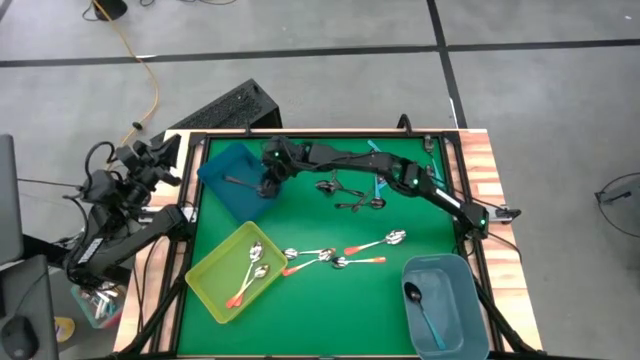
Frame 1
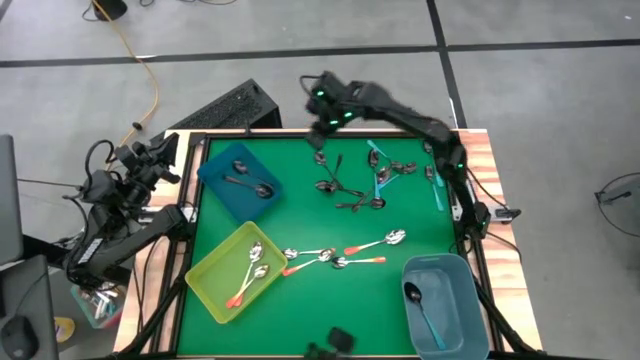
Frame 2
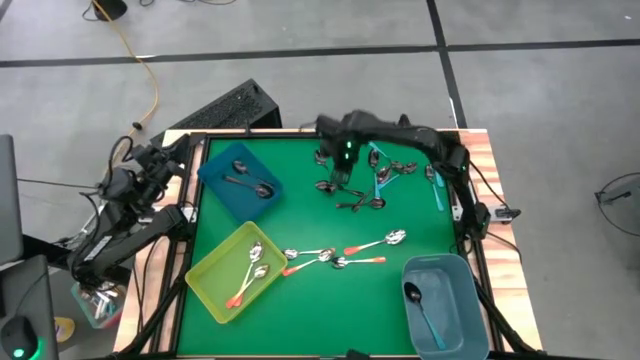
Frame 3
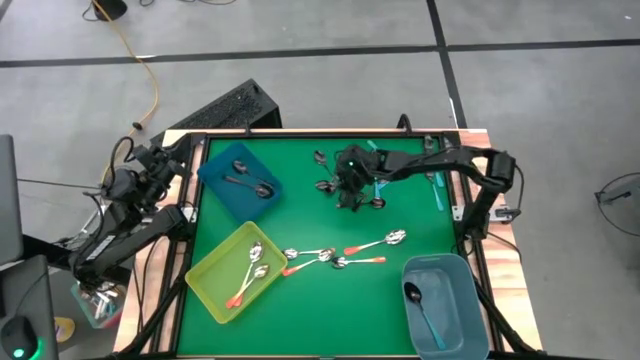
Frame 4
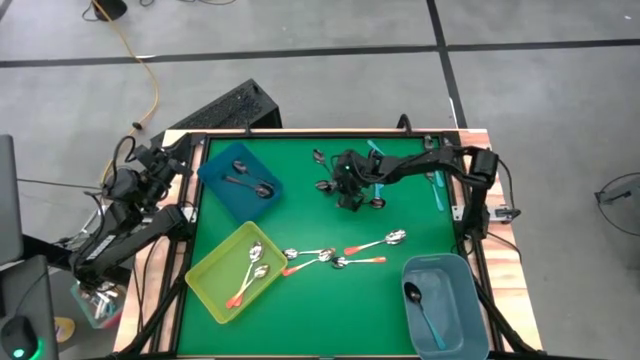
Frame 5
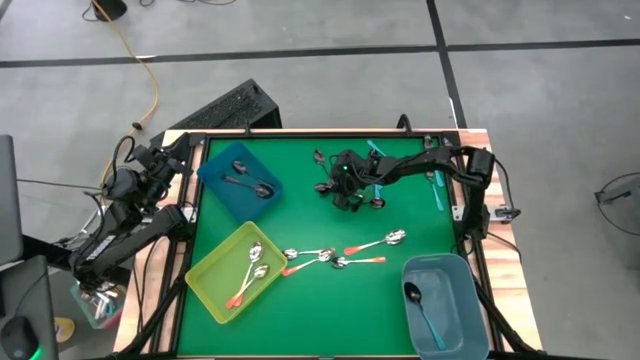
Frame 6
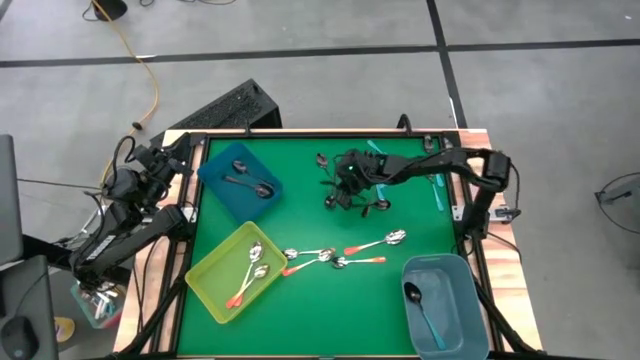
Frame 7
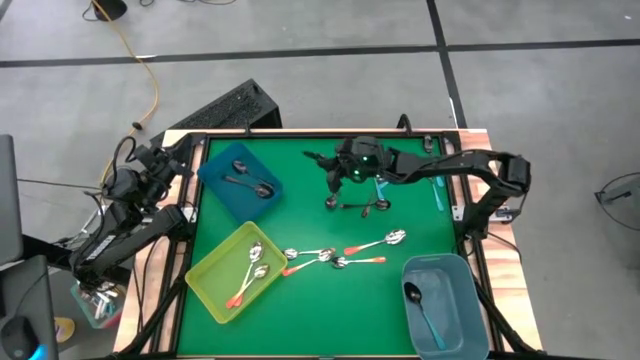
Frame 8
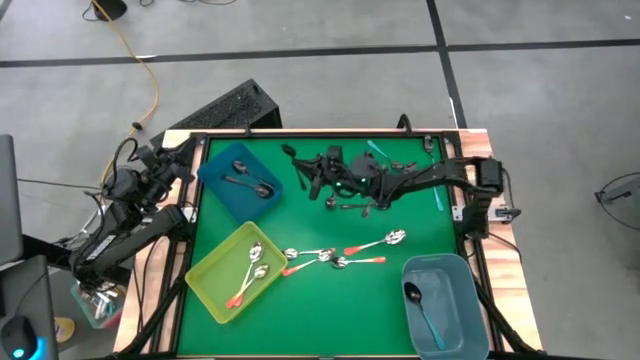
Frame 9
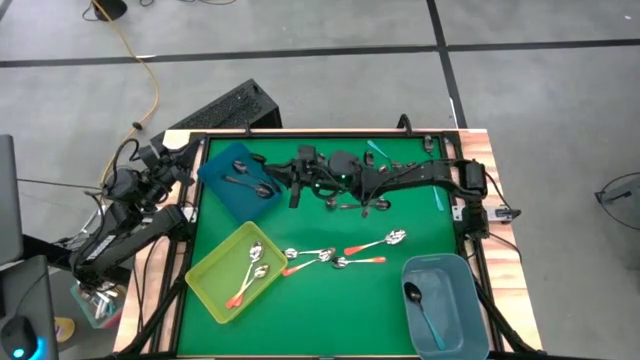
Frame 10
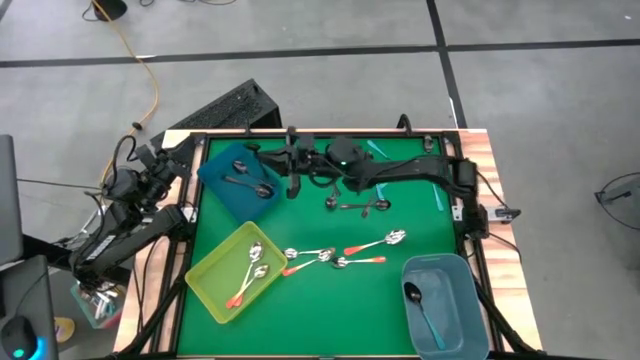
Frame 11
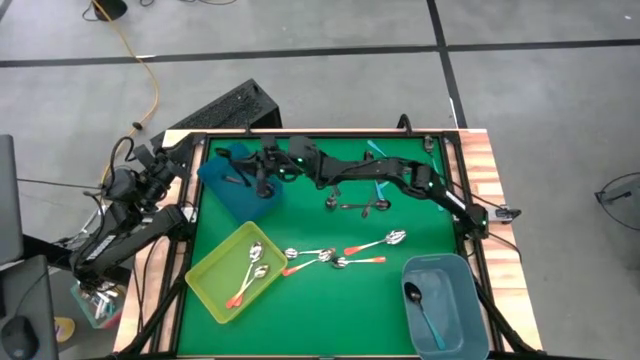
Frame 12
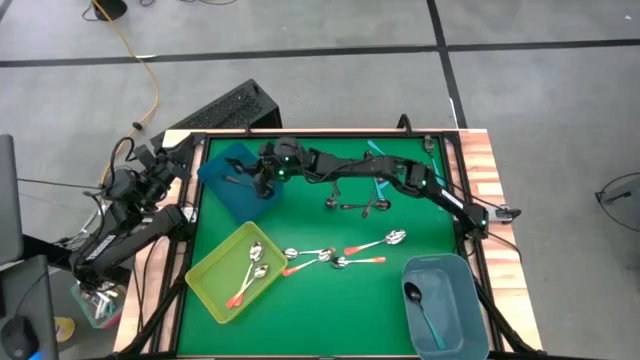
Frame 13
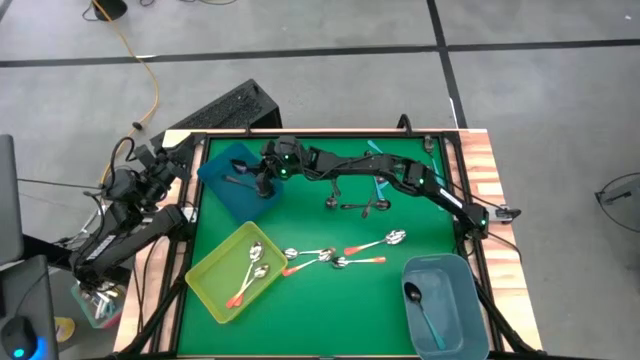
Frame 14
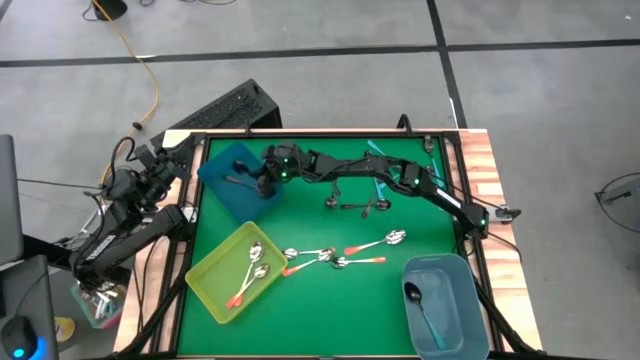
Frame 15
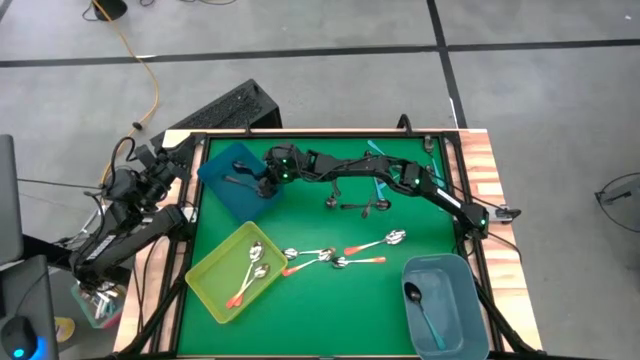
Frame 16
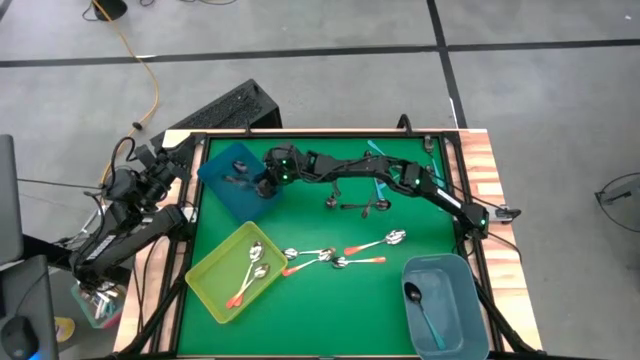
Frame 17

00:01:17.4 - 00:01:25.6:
Task: Sort silverware by color (type)
Put the black spoon into the dark blue bin

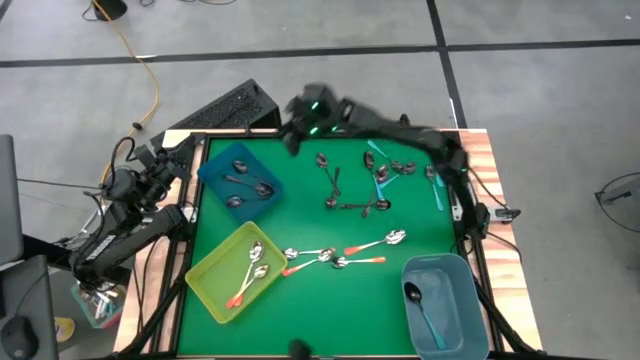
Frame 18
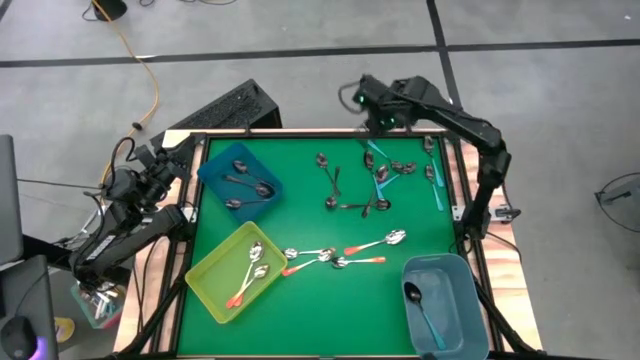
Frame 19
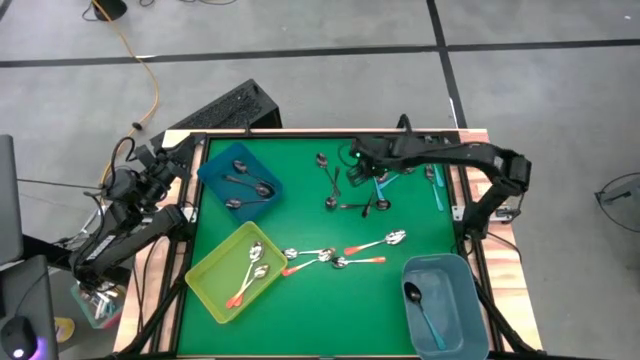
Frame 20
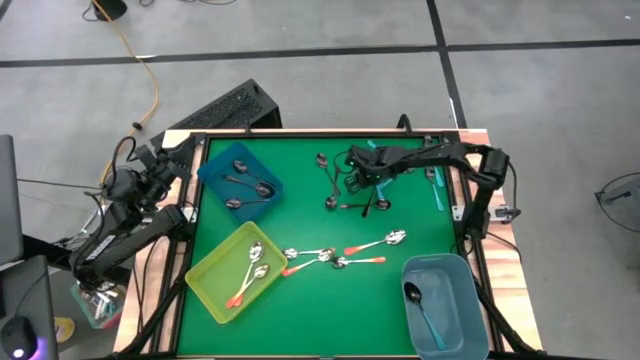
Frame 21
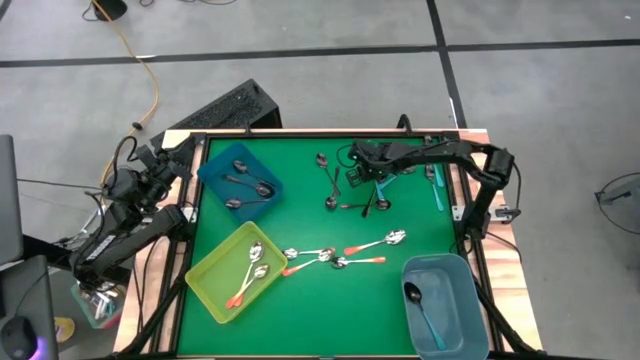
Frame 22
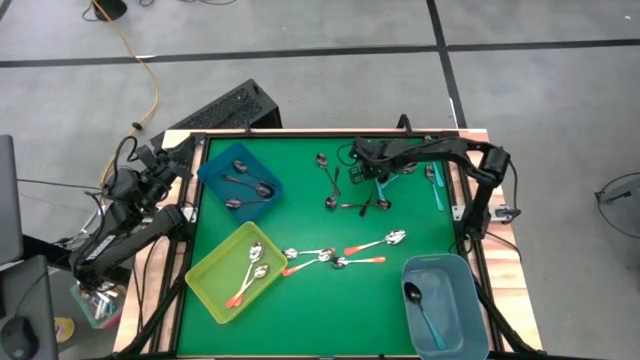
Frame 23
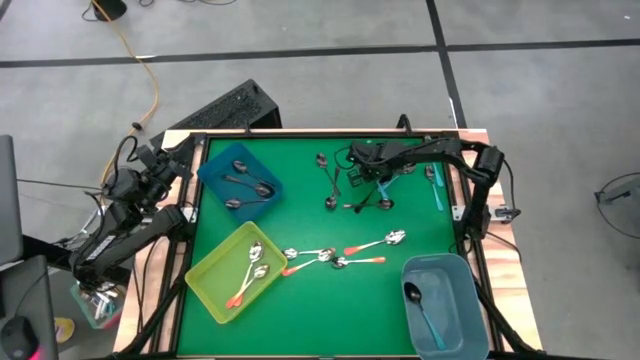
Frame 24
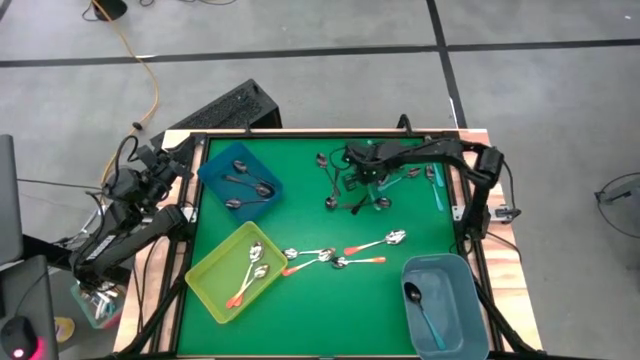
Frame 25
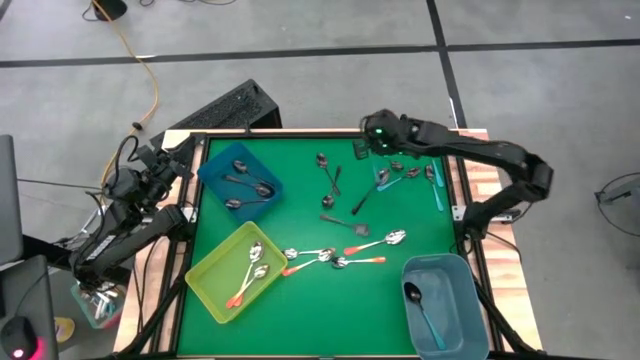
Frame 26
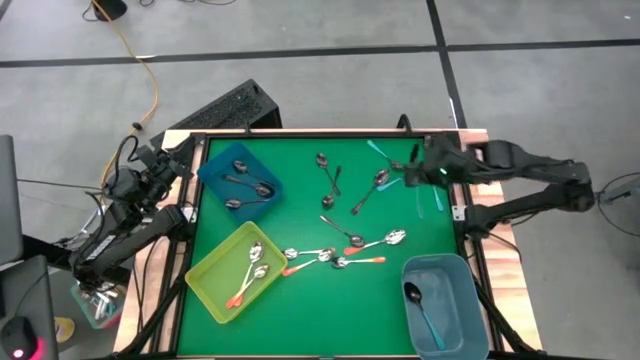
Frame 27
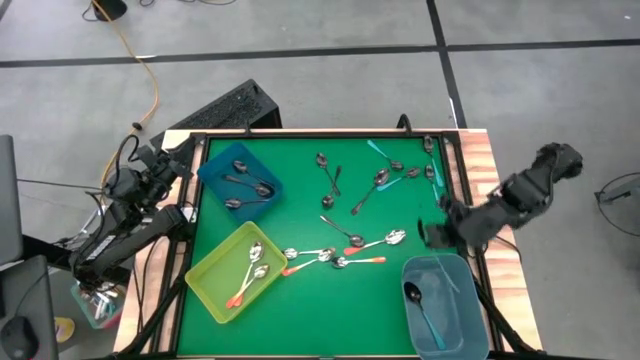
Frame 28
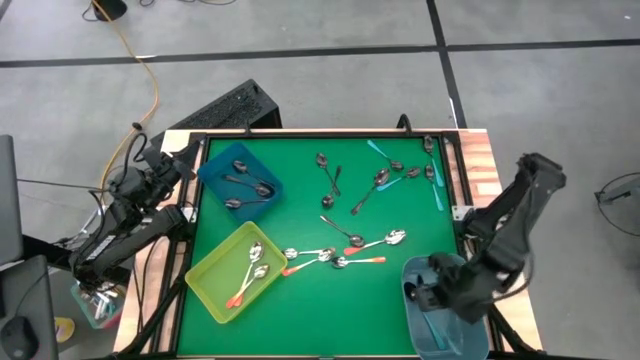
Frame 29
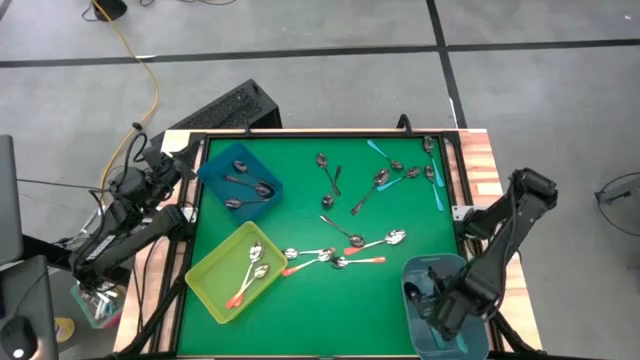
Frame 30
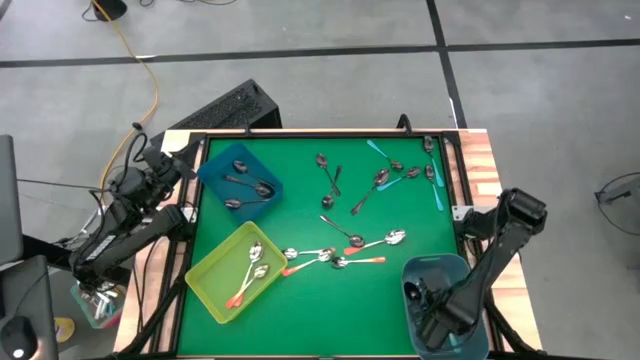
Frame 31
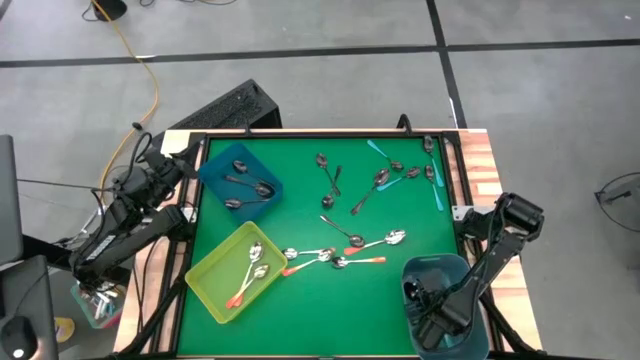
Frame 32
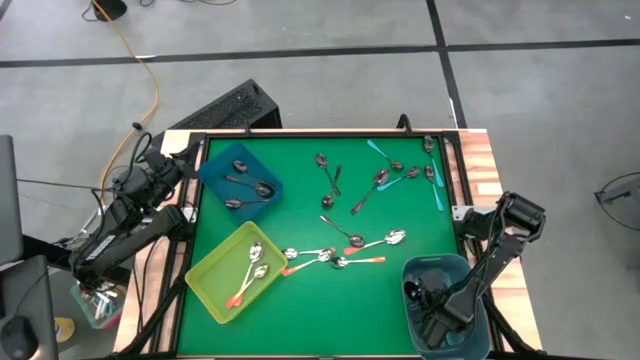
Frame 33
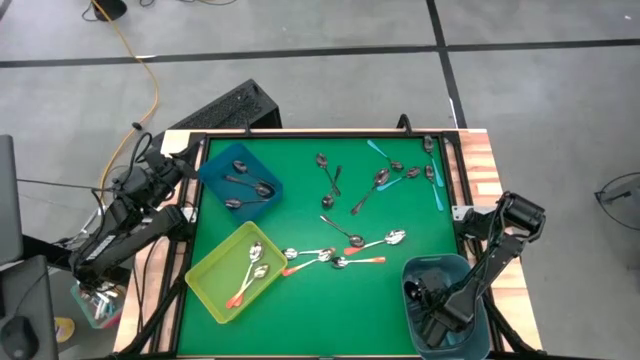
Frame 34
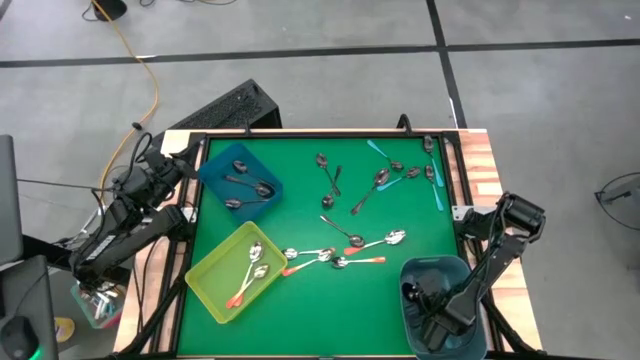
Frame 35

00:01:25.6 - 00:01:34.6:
Put the blue spoon into the blue bin

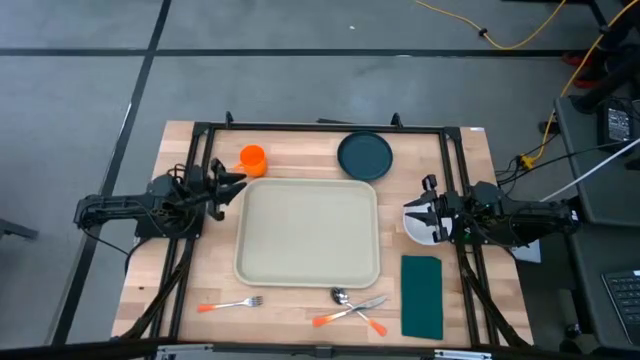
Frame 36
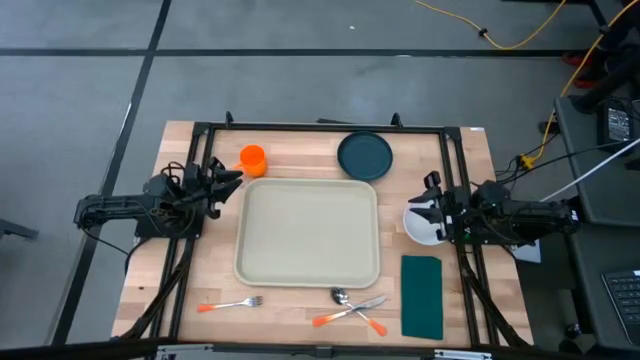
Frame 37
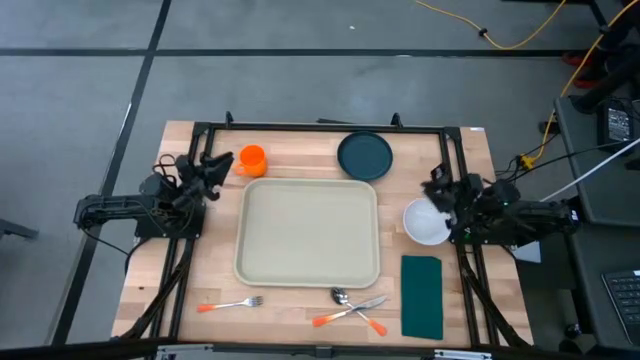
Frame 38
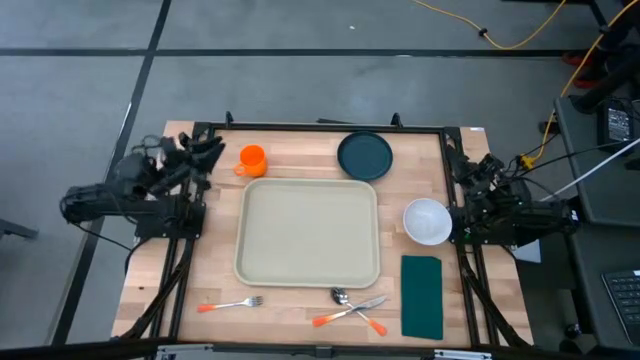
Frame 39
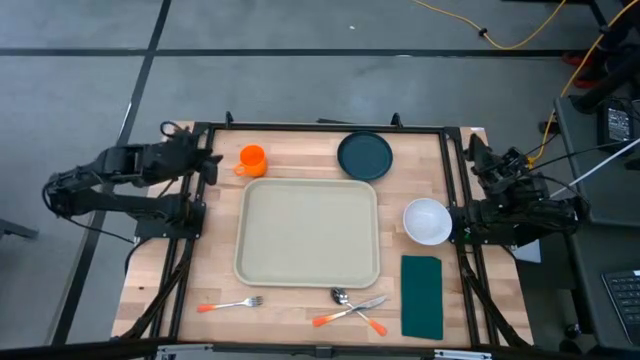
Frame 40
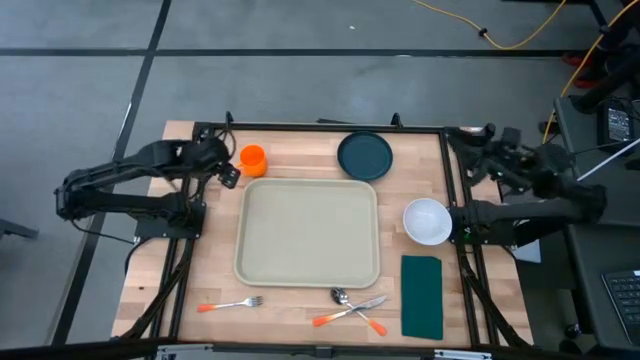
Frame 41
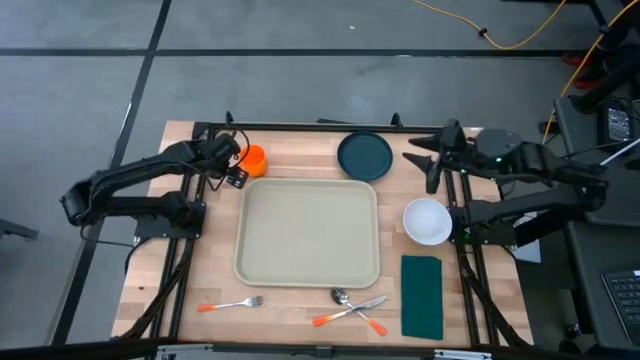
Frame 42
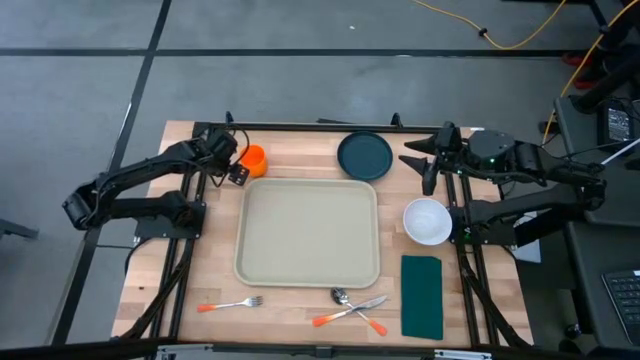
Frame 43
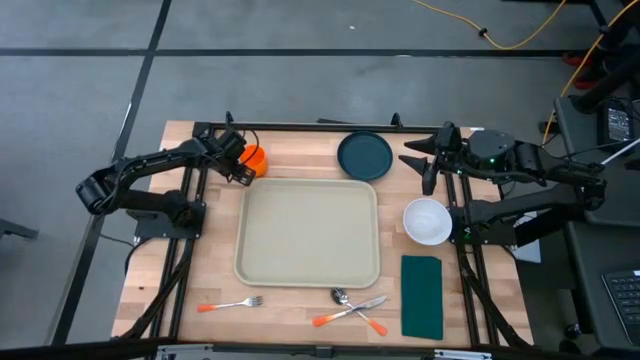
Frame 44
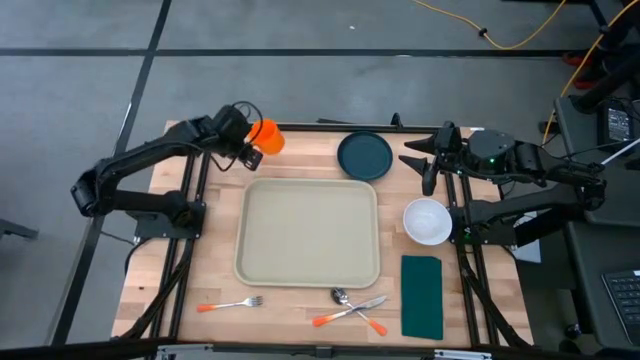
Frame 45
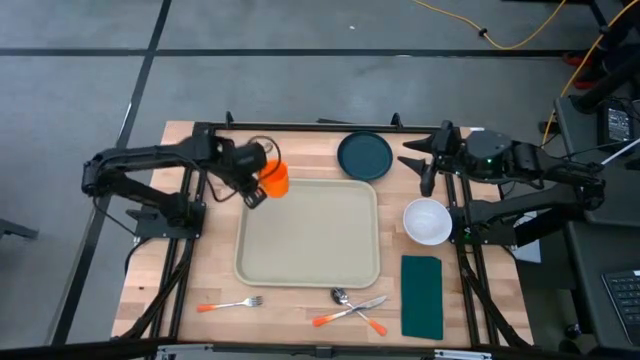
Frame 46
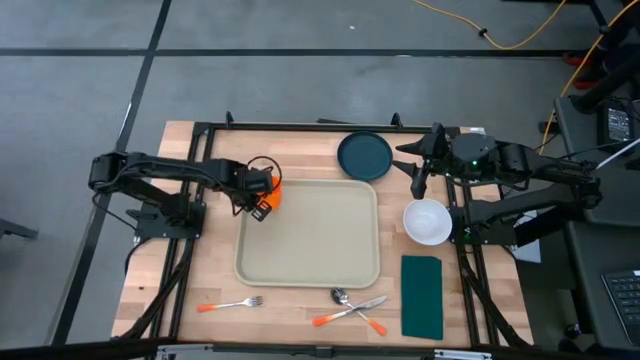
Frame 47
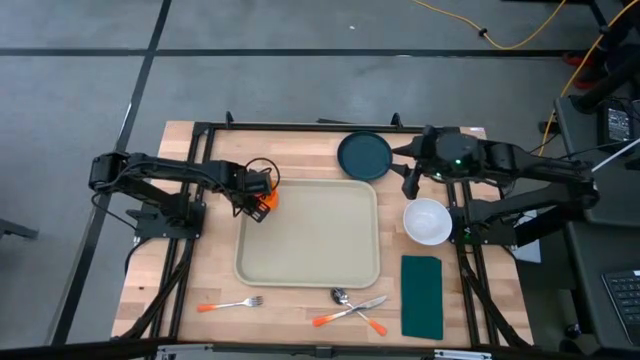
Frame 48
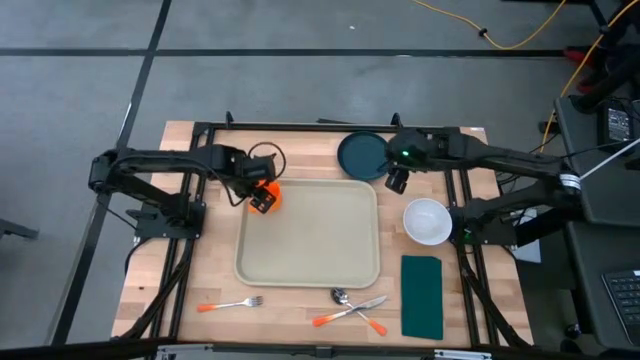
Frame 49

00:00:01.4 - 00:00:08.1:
Task: Set up tray
Put the orange cup on the gray tray
